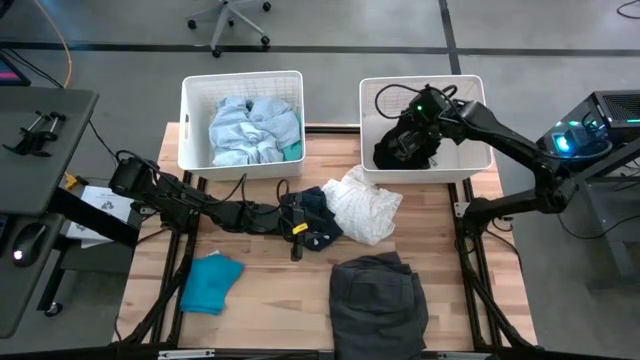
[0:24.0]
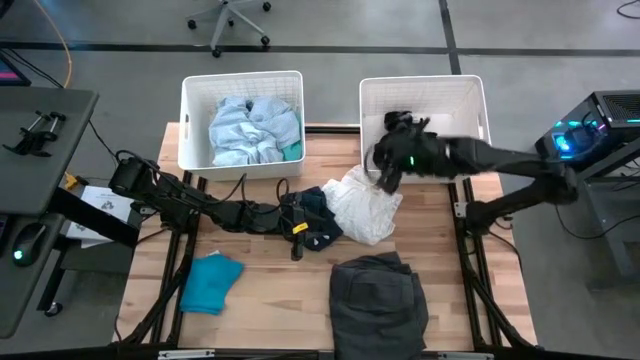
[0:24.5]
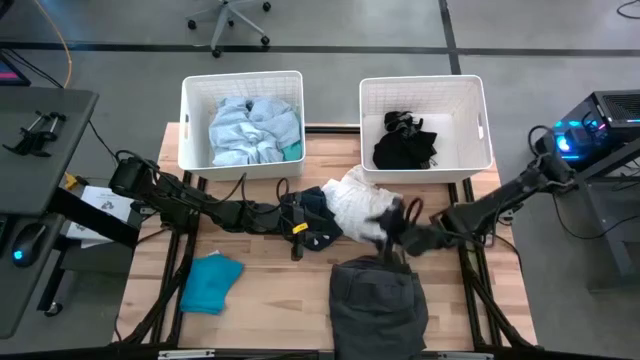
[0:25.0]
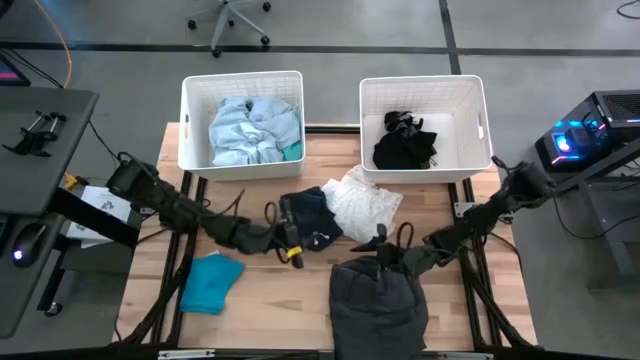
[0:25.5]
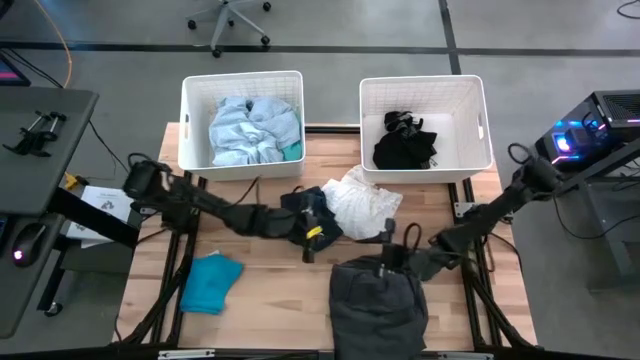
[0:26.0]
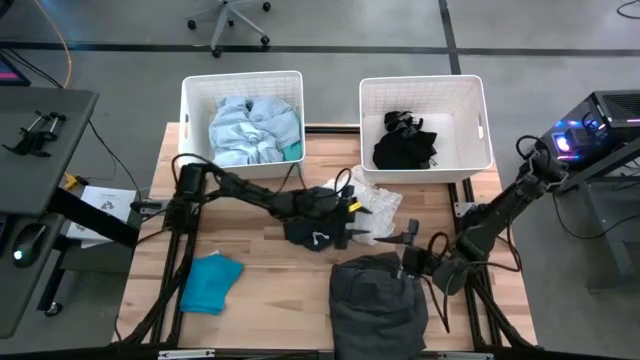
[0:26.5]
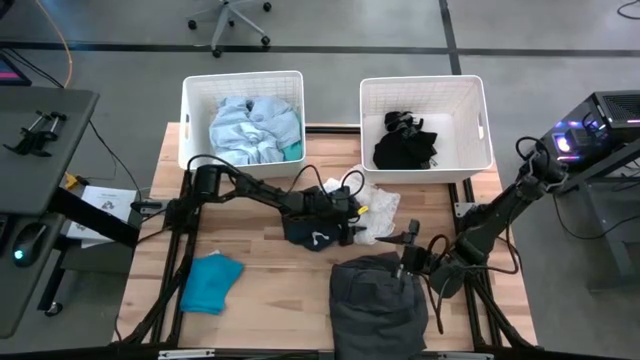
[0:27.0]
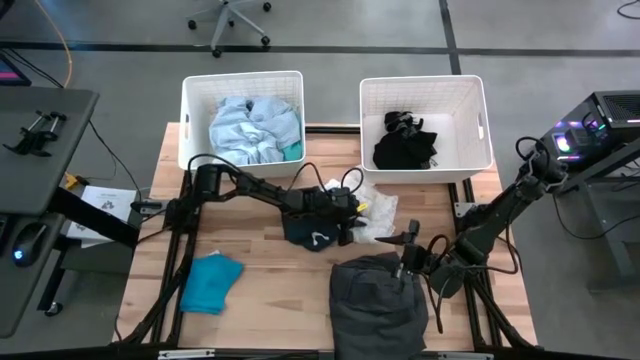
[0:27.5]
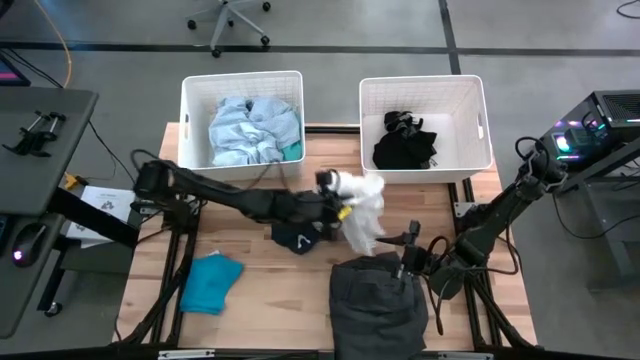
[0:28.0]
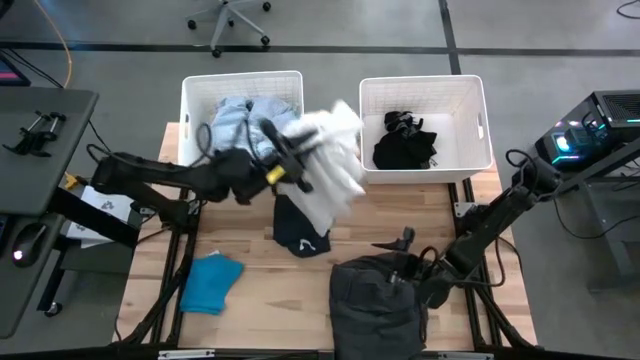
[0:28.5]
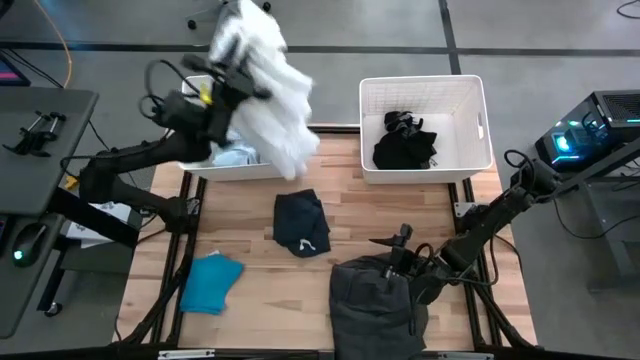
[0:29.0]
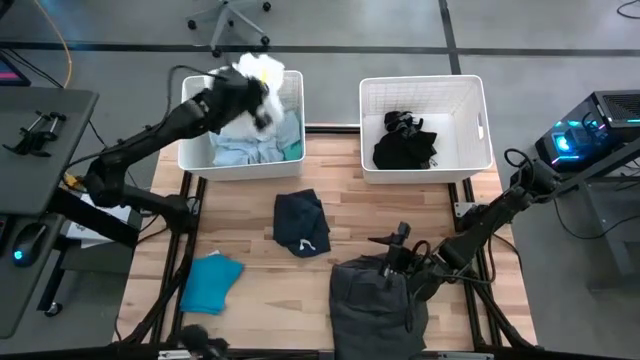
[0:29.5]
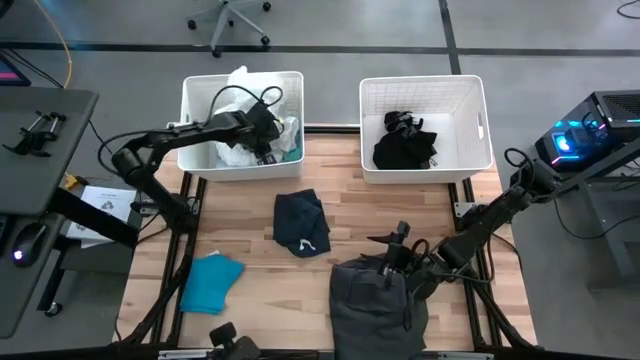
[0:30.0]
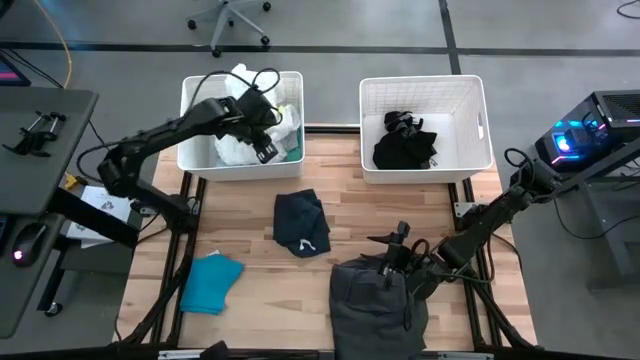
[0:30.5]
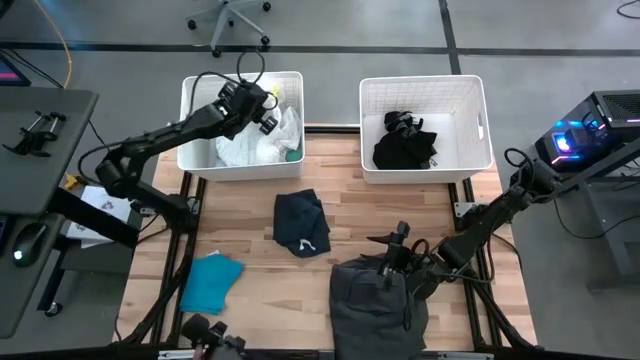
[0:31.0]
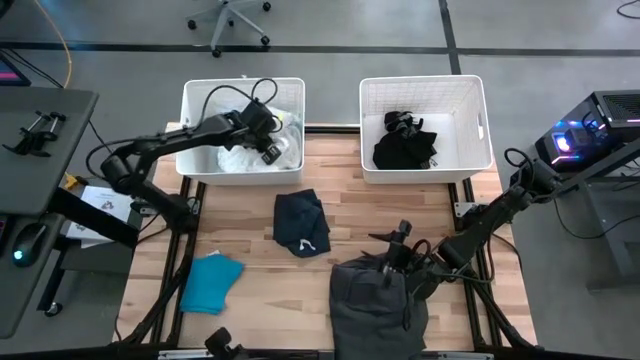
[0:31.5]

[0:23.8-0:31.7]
Task: Sort clothes
Put the white dress into the left white laundry organizer

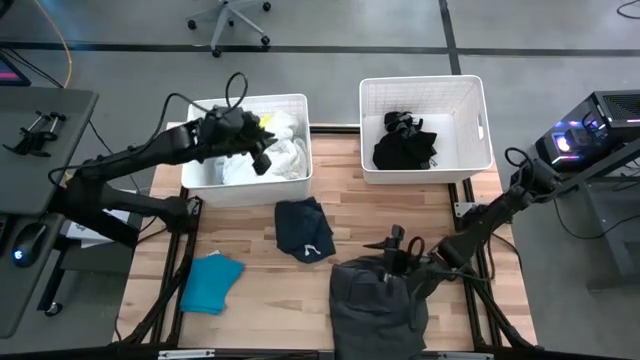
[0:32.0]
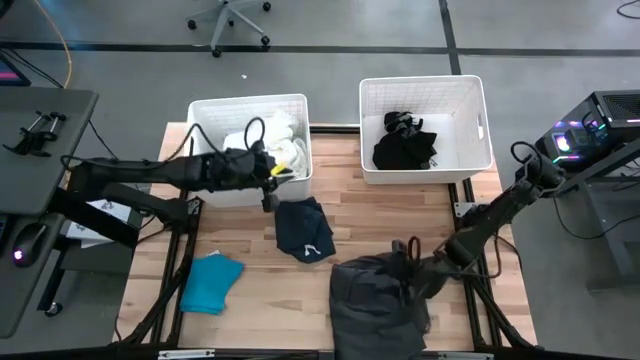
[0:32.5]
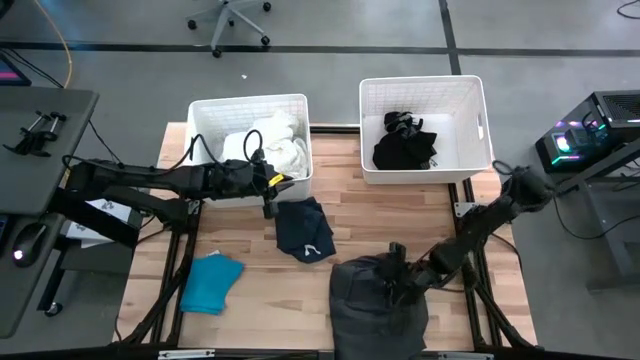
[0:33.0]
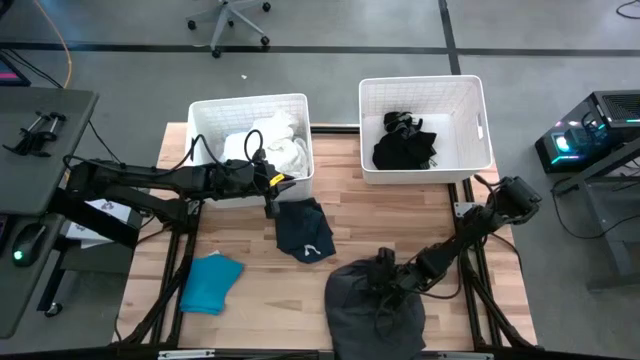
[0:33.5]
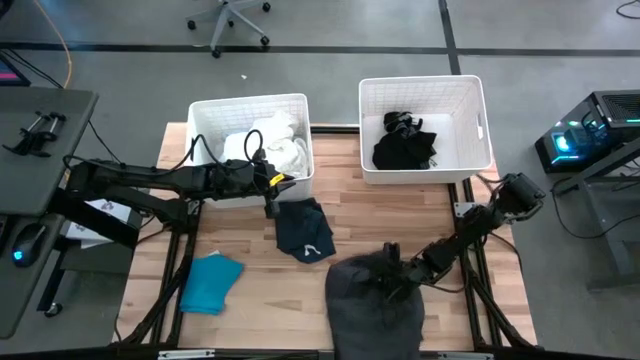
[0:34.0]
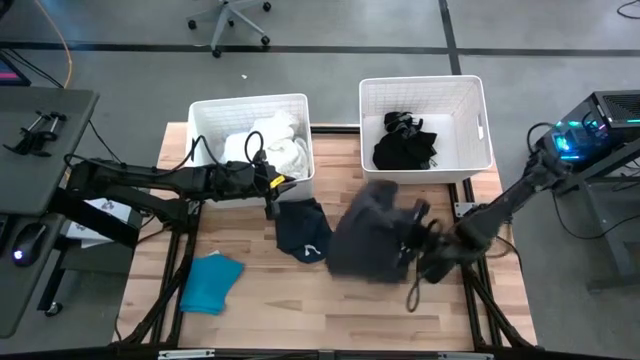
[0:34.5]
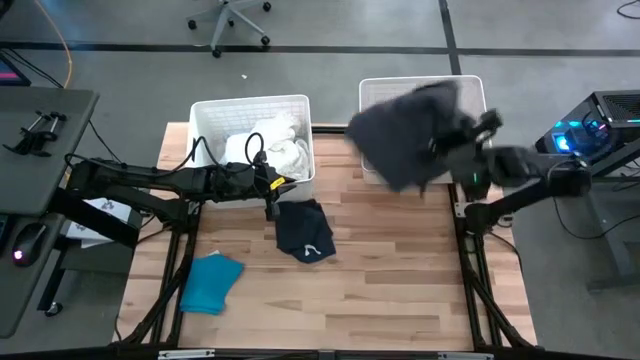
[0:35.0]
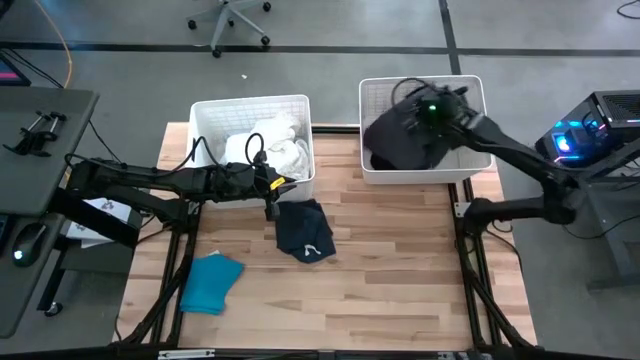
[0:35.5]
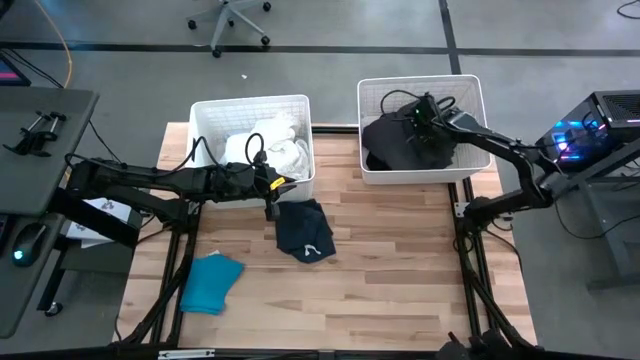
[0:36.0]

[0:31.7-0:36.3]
Put the black pants into the right white laundry organizer

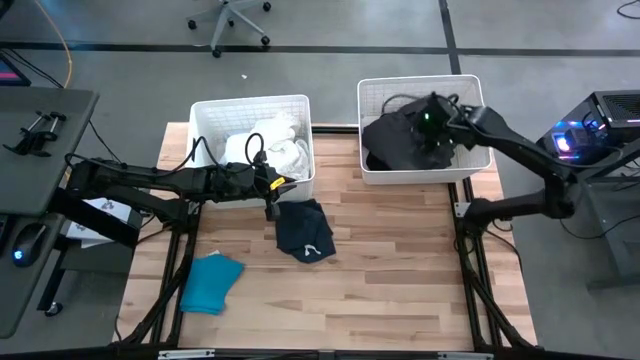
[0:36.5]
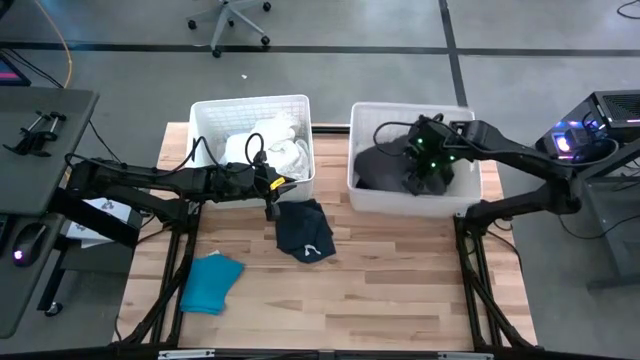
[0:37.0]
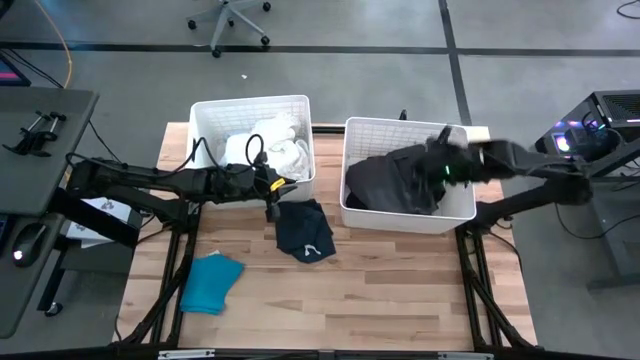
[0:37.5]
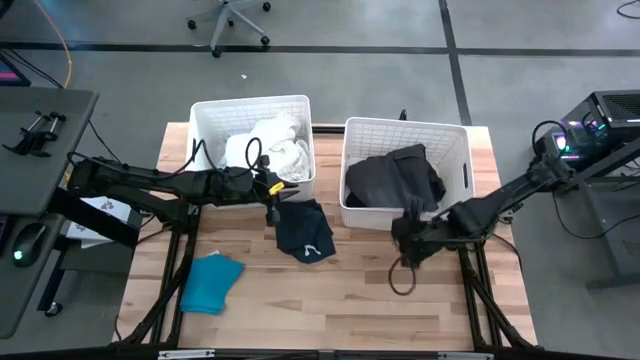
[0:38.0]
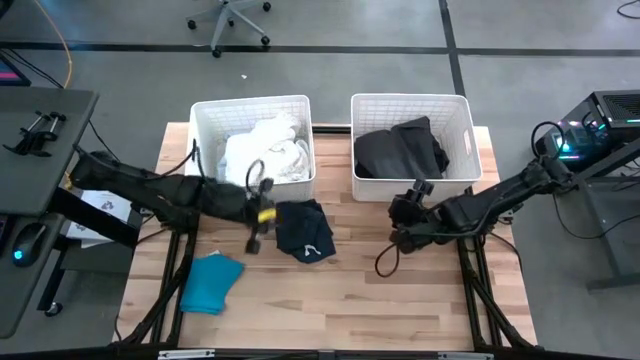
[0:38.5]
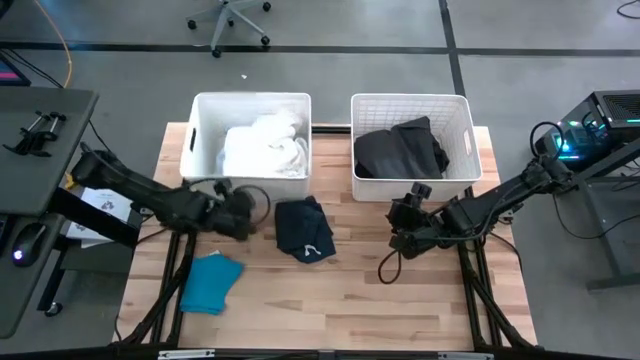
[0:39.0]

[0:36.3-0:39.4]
Adjust the white laundry organizers on the table

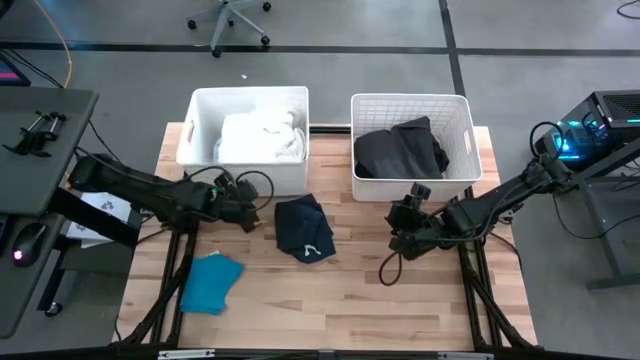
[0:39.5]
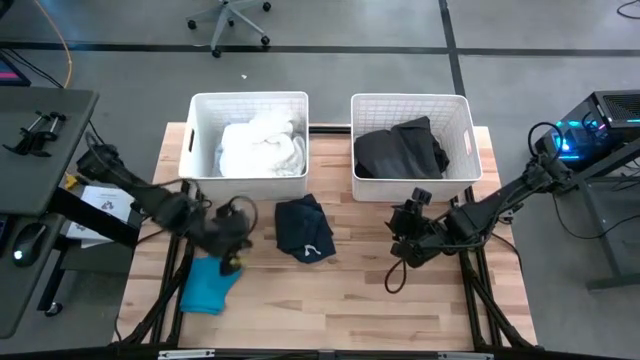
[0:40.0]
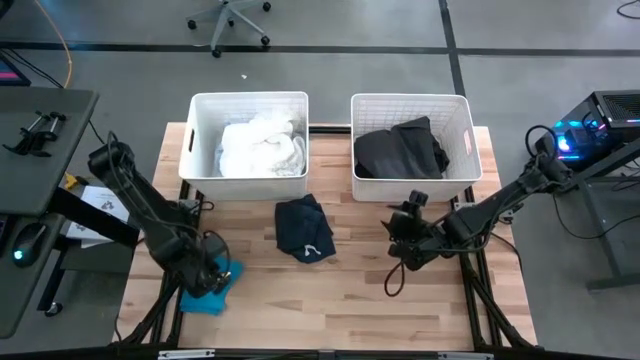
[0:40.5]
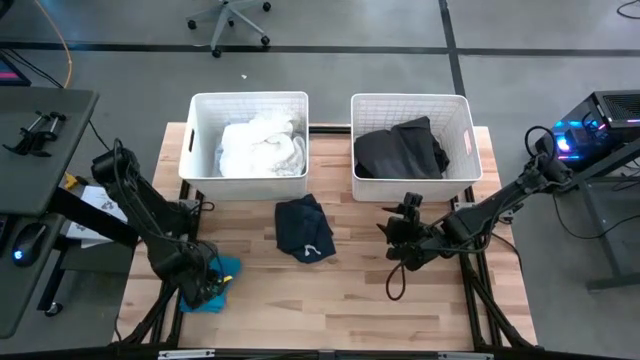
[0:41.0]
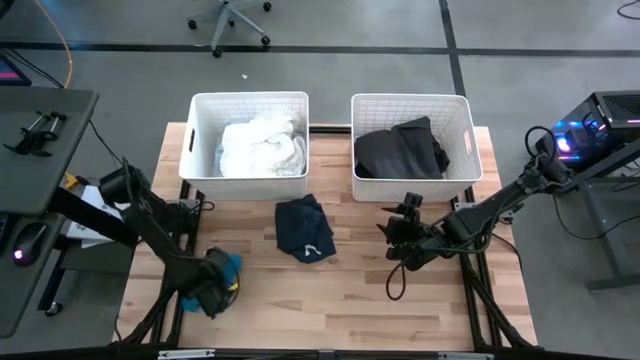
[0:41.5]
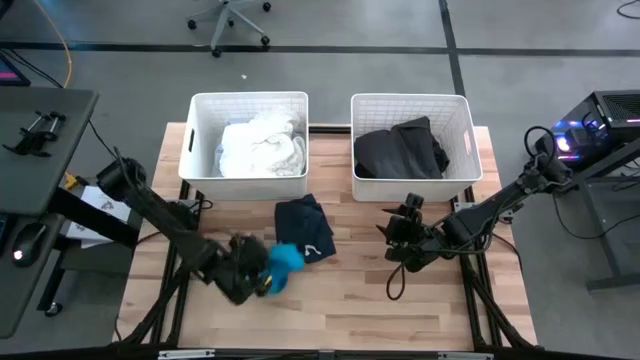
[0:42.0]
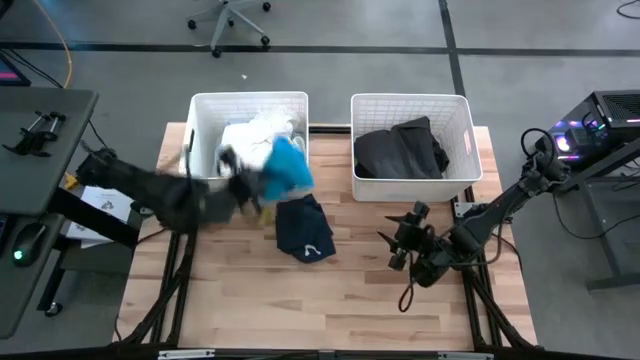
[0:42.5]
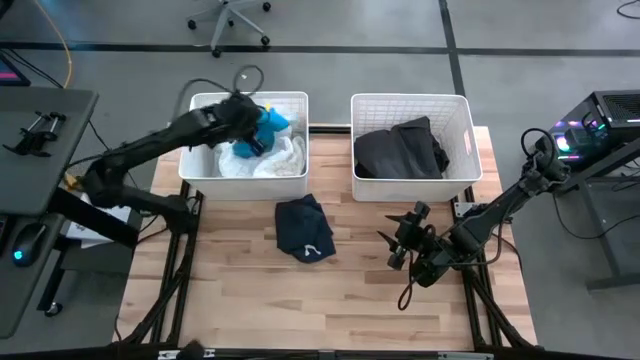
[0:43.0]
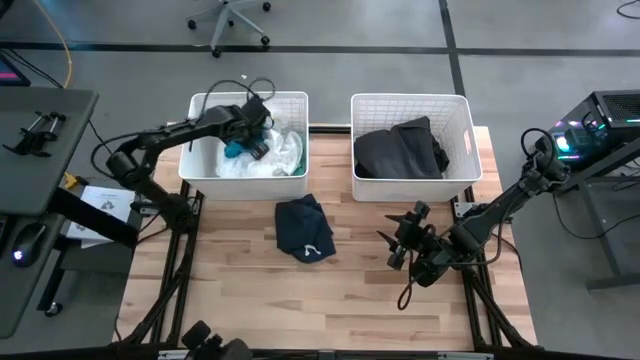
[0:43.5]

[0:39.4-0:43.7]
Put the blue towel into the left white laundry organizer

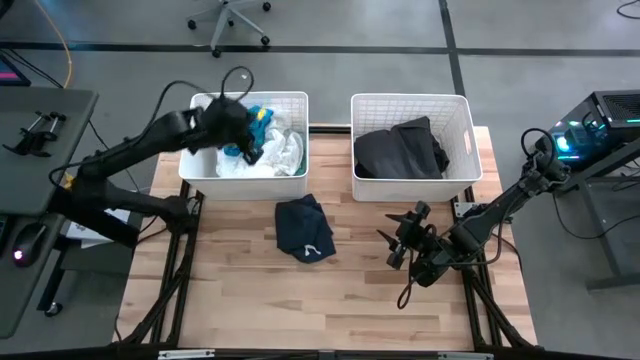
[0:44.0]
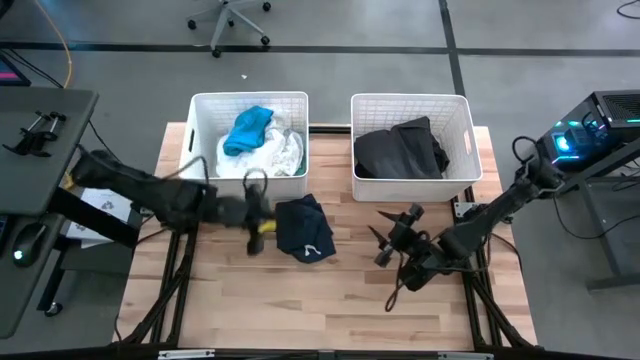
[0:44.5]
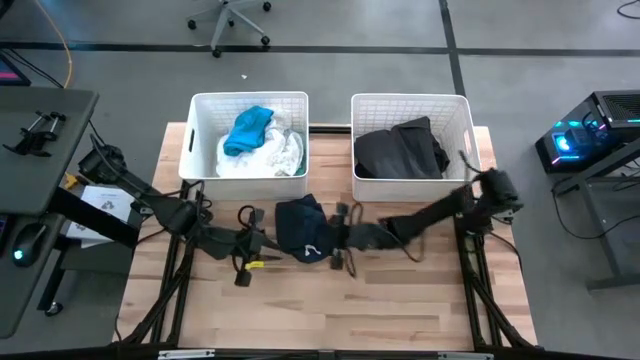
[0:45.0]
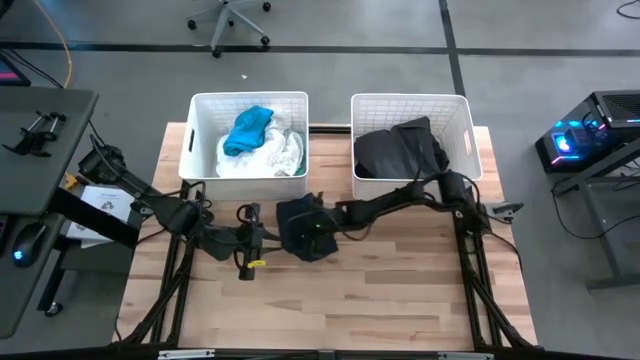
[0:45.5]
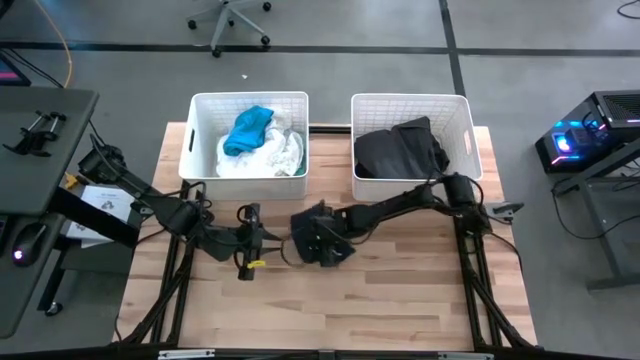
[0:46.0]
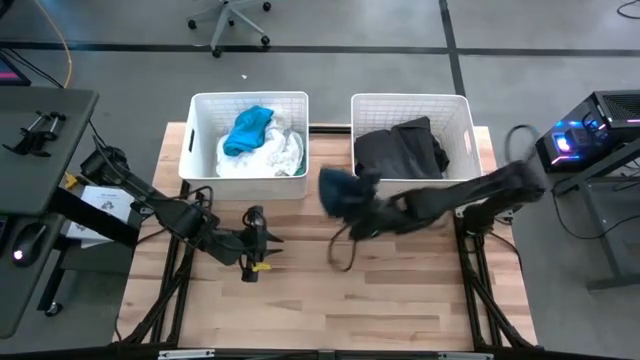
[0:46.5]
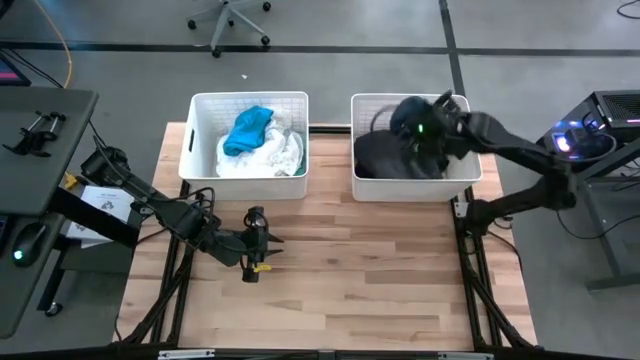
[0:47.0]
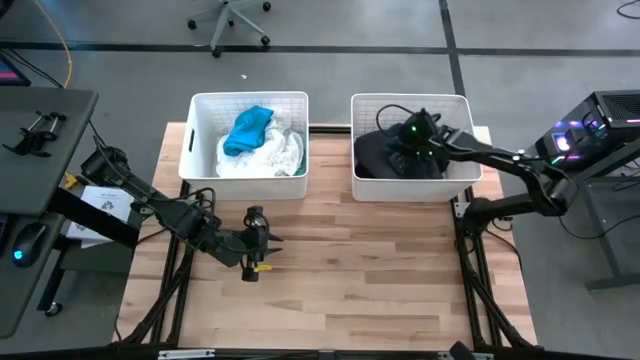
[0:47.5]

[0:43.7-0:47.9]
Put the dark blue shorts into the right white laundry organizer
